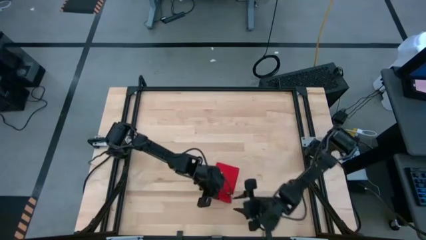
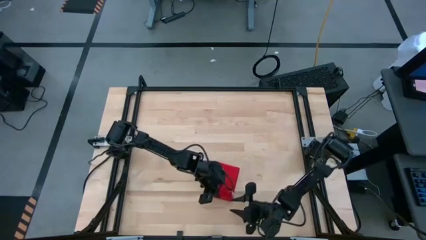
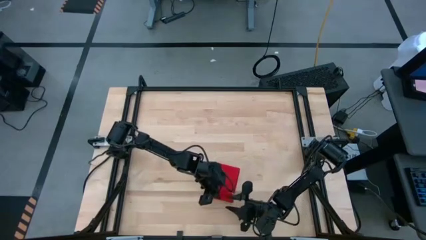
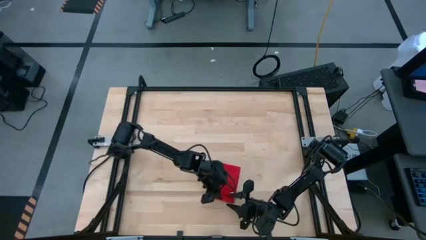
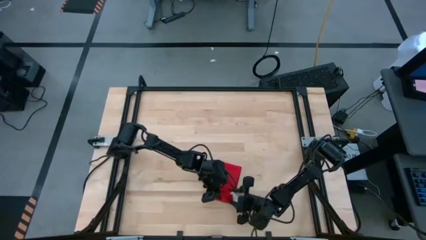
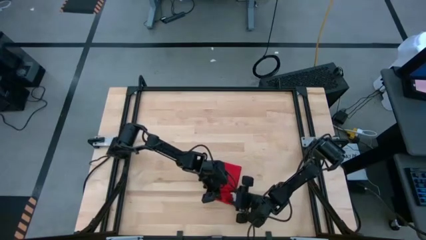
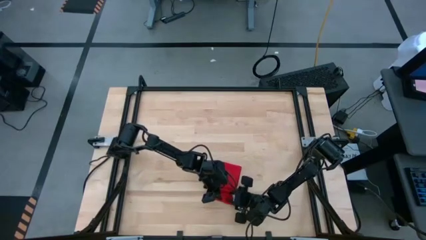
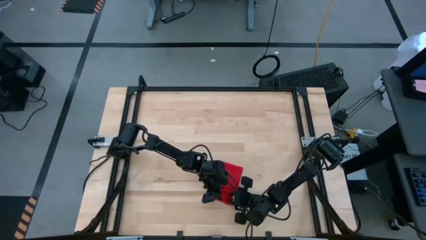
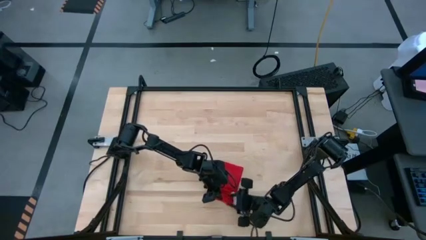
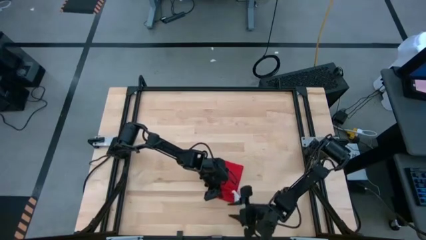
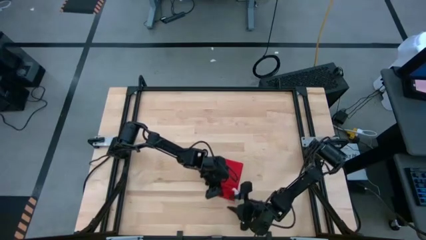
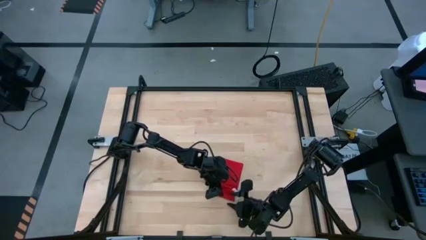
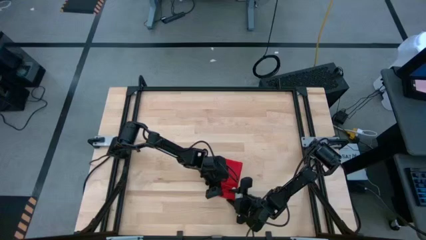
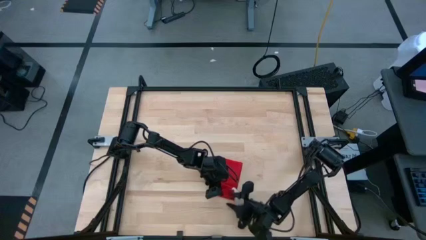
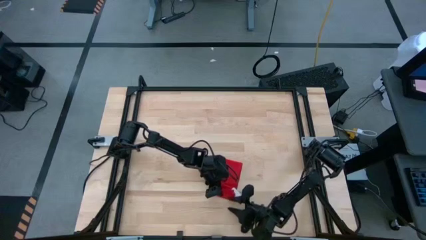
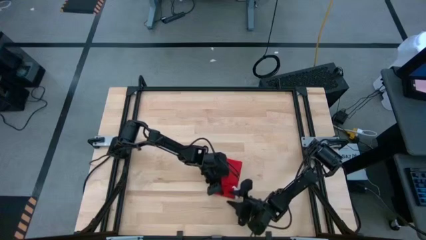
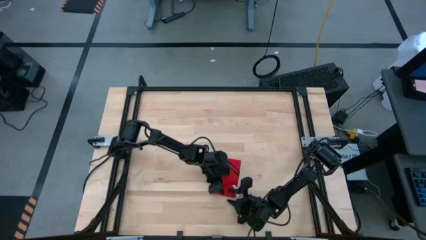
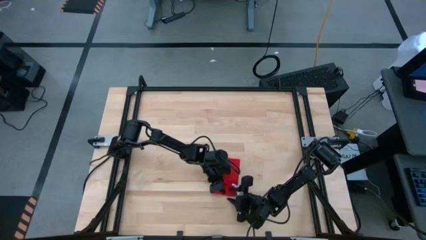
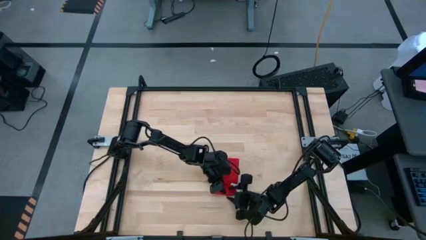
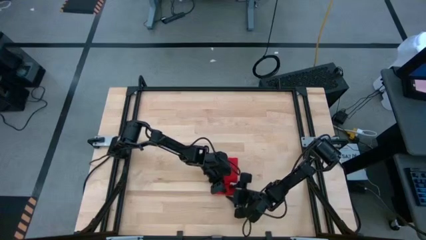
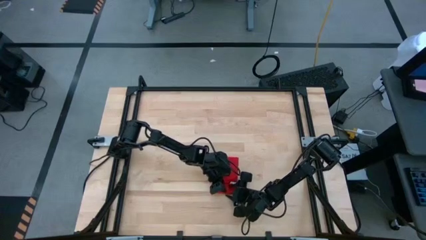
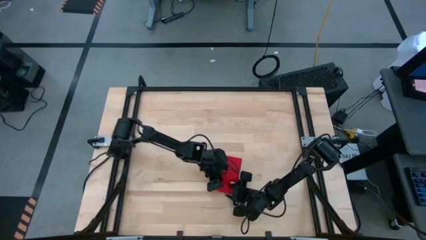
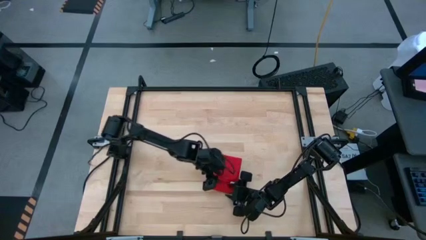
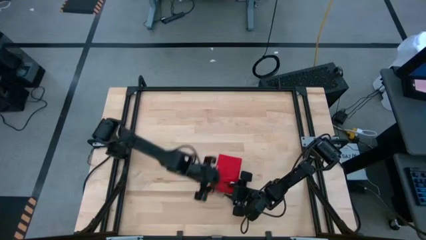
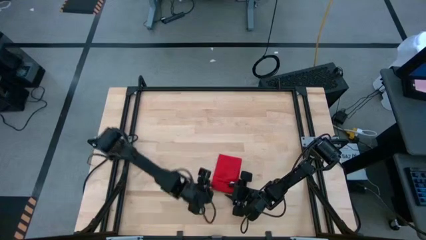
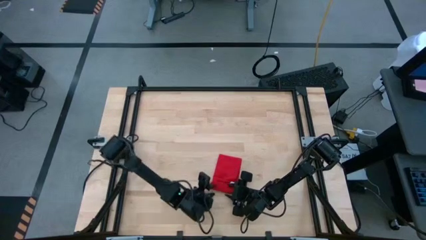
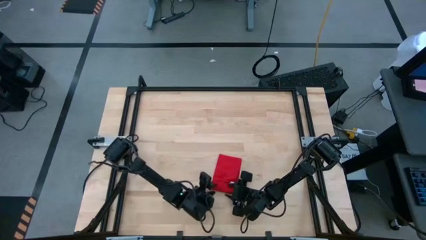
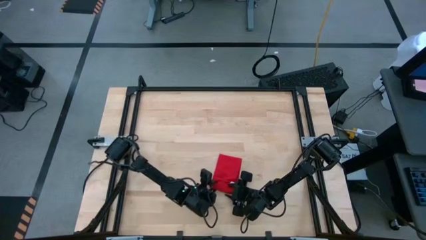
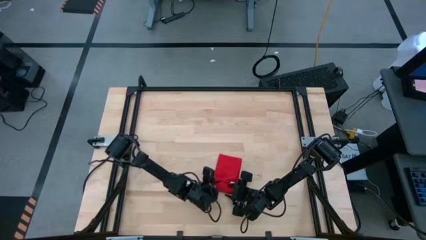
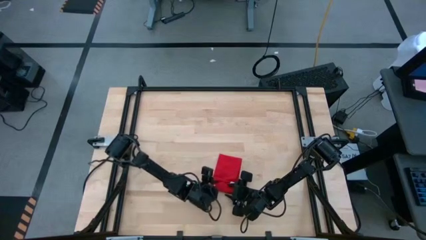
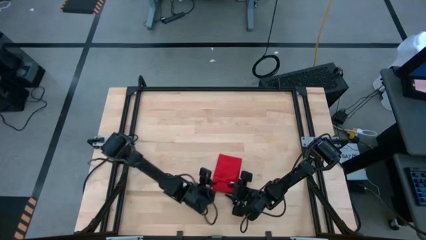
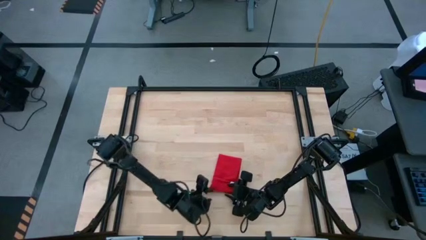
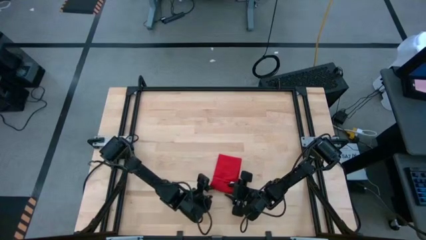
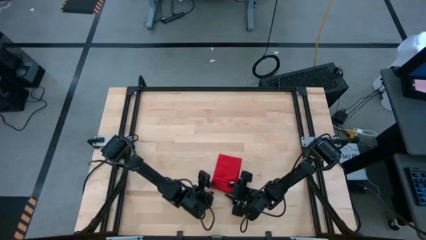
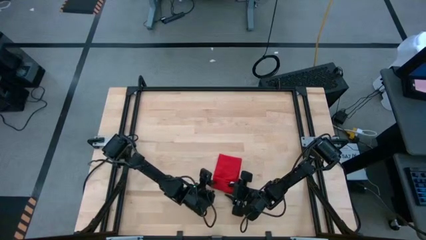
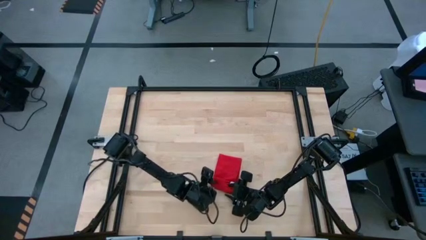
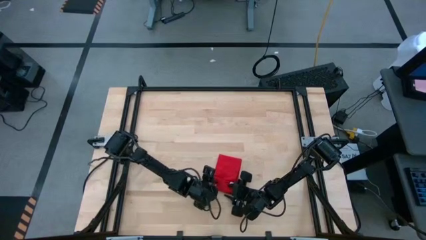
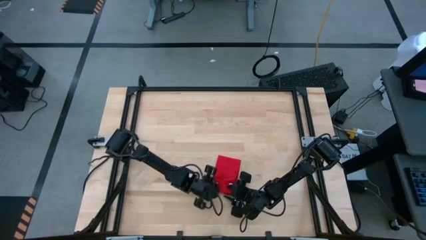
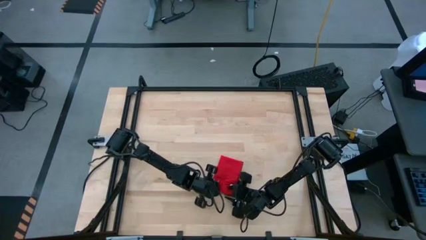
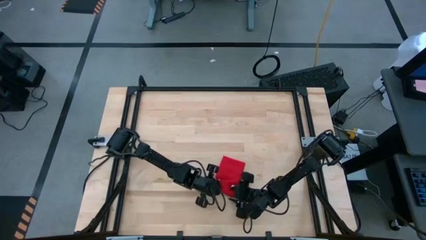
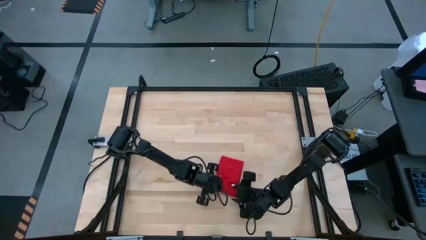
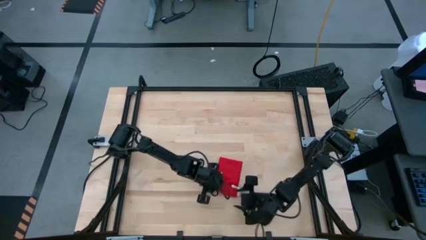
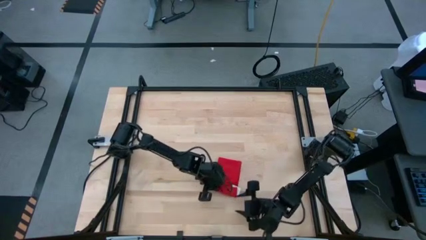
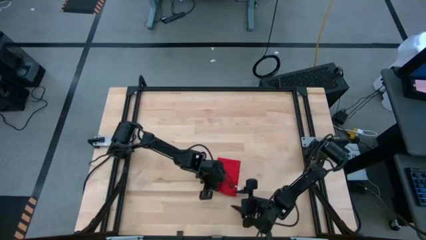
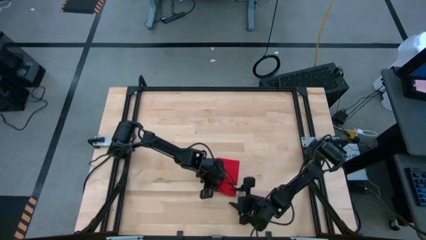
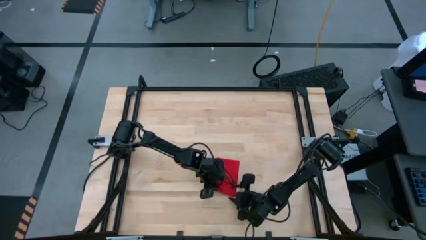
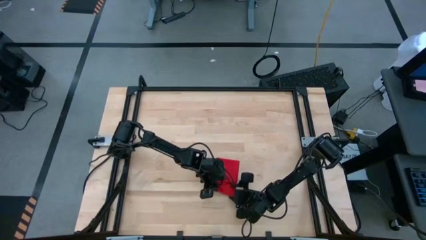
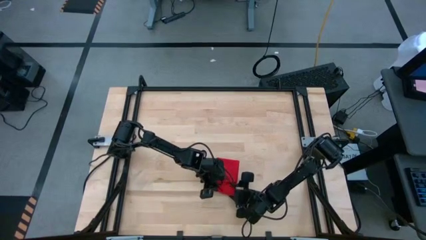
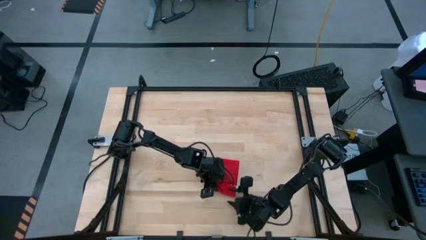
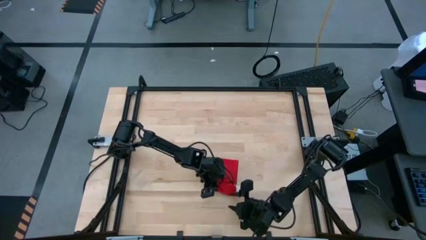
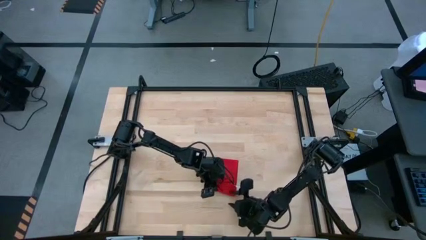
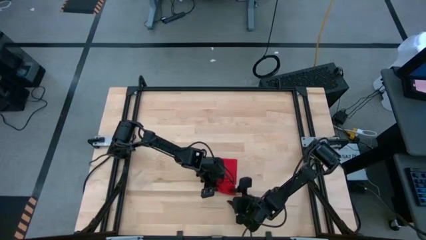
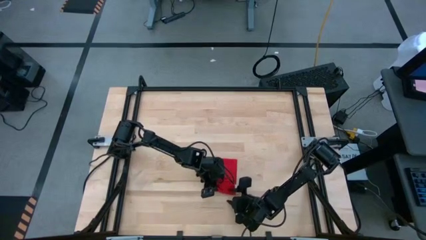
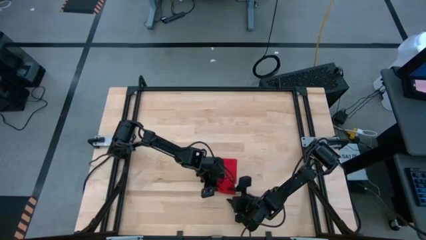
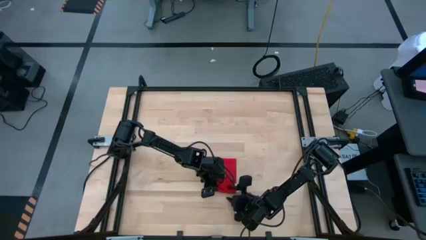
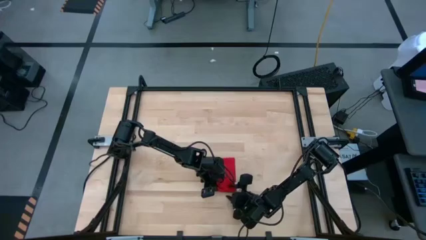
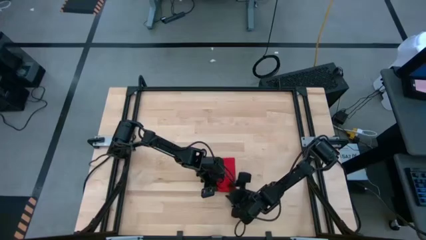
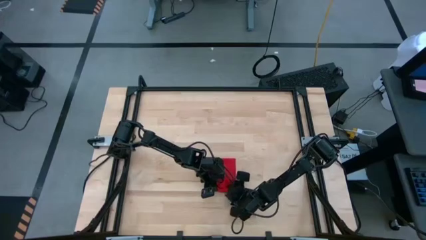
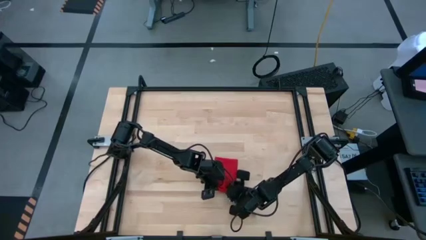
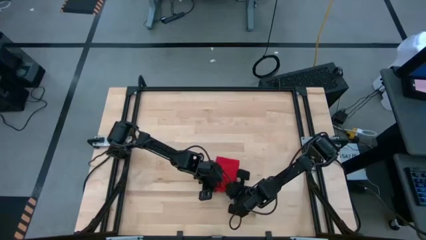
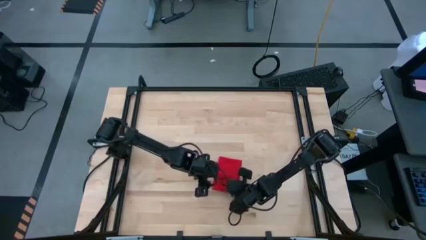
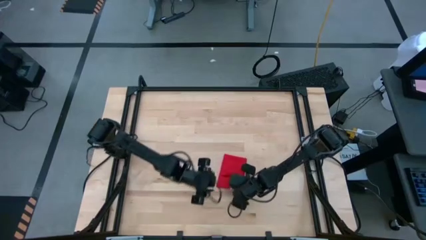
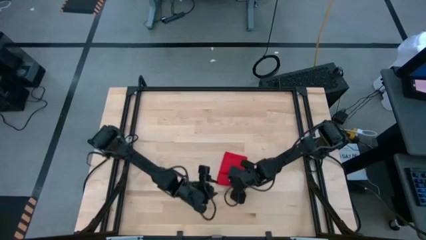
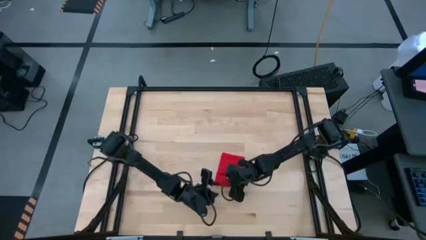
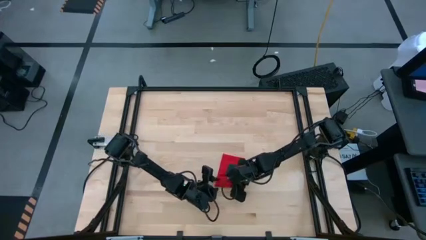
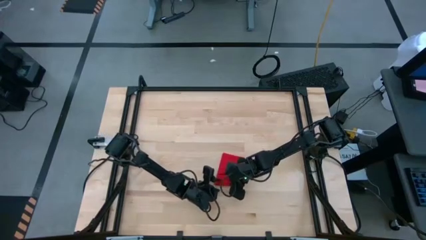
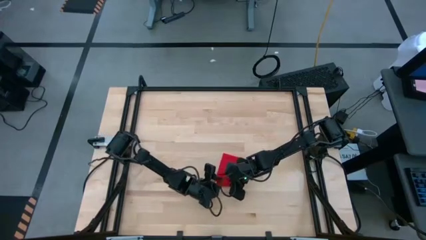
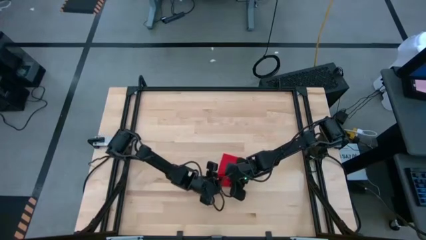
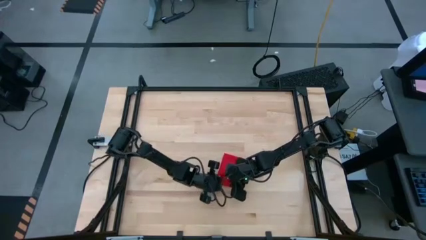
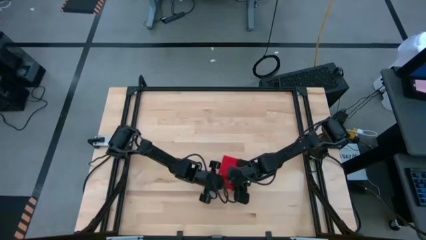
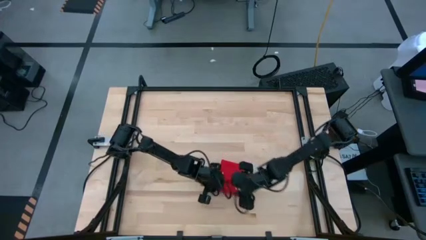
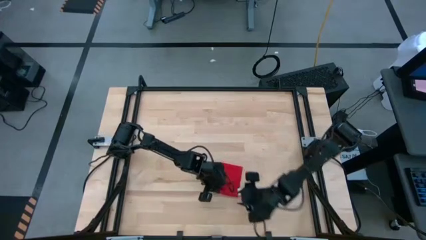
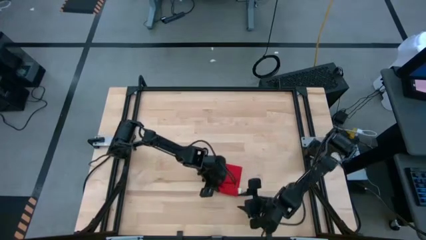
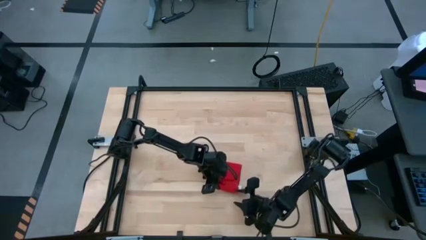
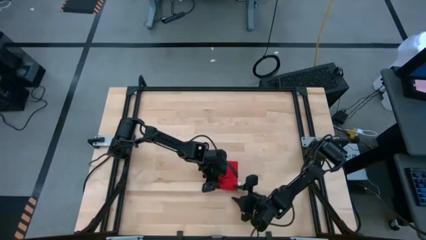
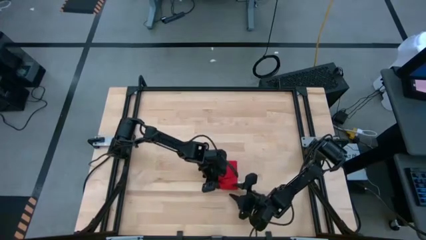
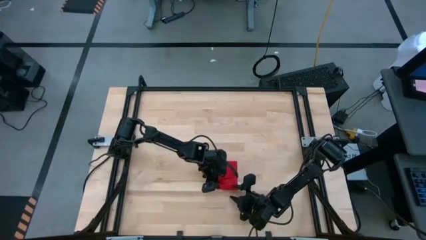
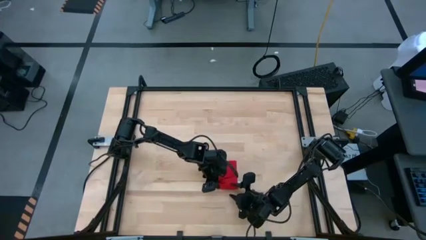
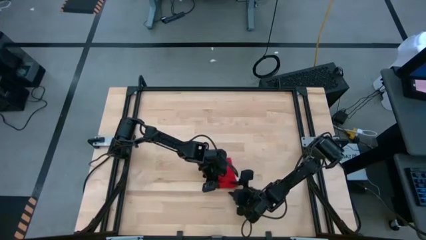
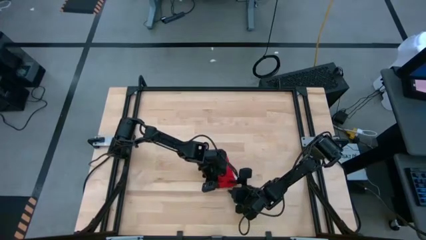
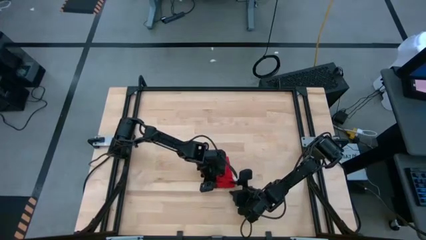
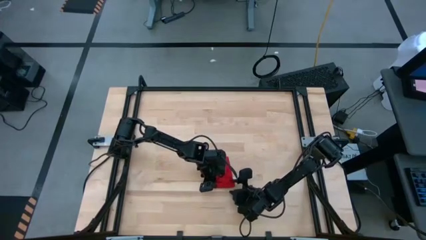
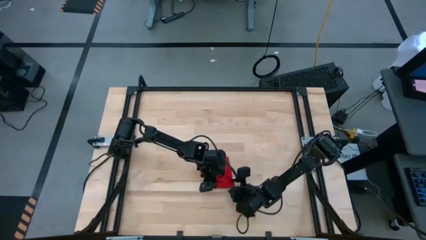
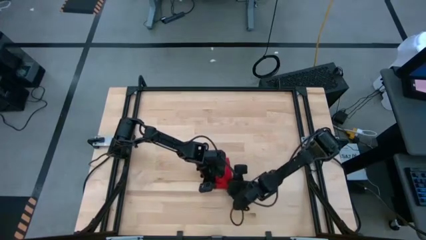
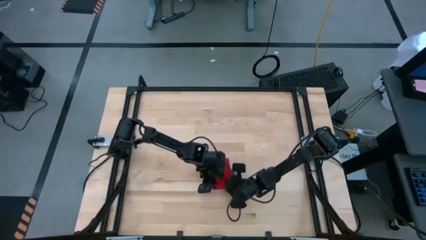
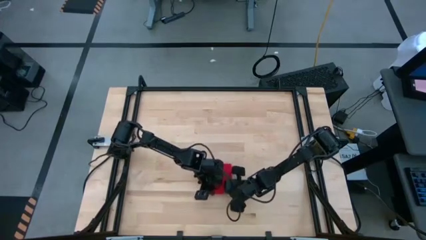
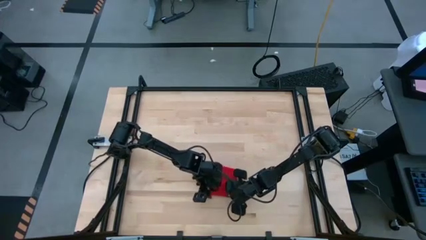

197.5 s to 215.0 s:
Task: Roll napkin
Roll the red napkin
